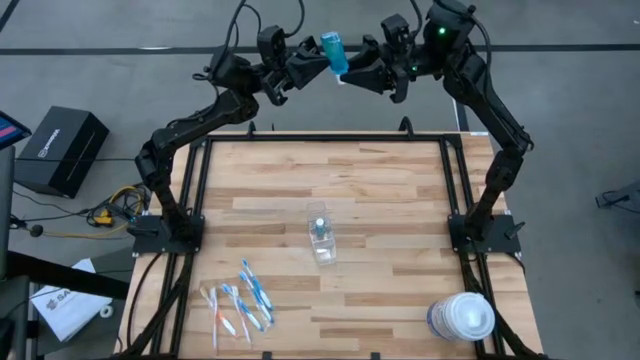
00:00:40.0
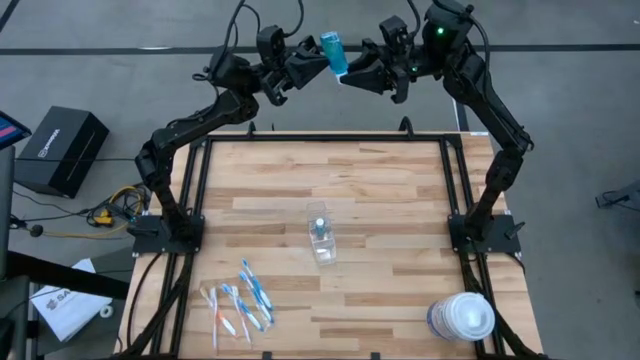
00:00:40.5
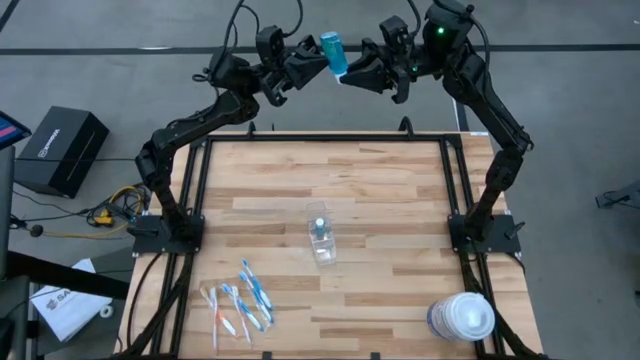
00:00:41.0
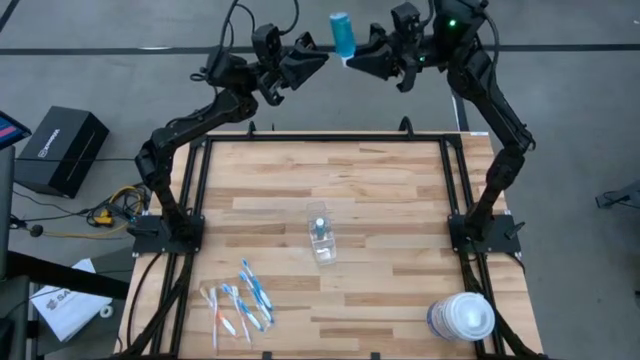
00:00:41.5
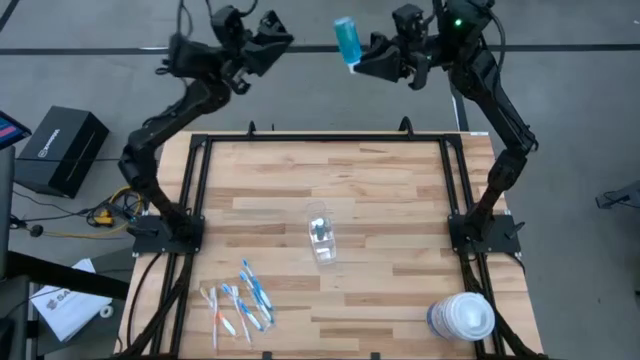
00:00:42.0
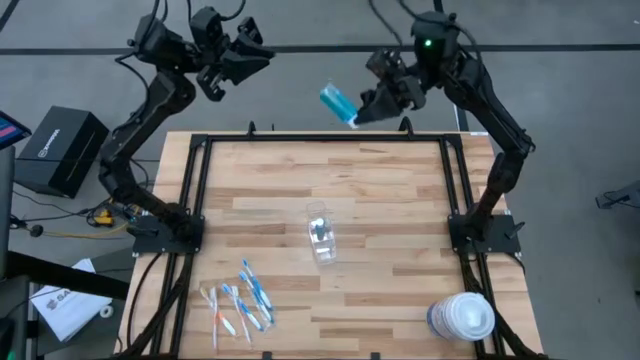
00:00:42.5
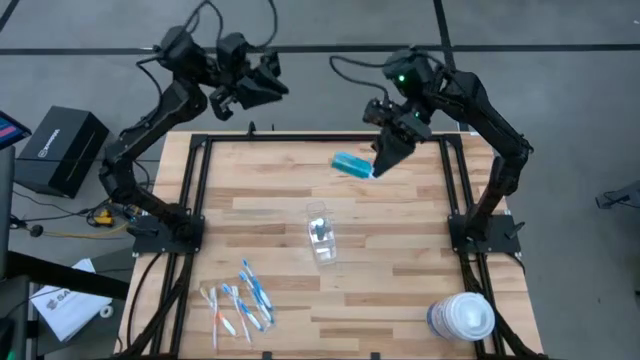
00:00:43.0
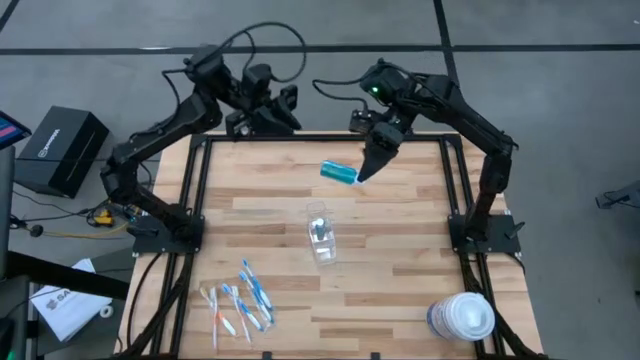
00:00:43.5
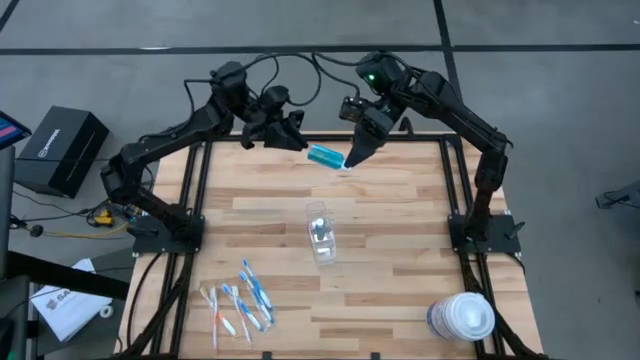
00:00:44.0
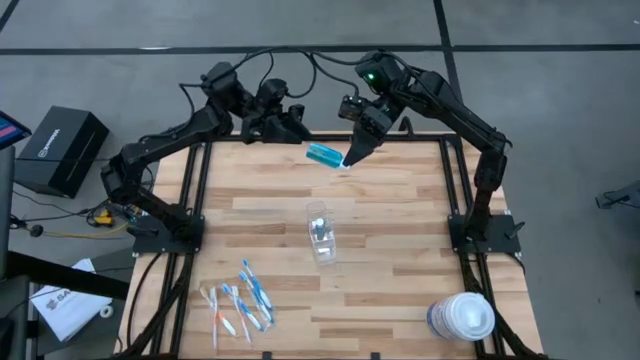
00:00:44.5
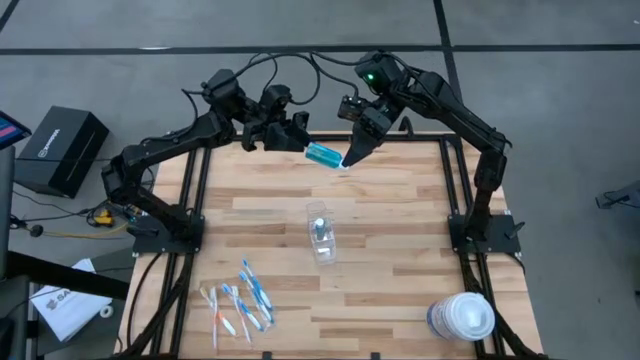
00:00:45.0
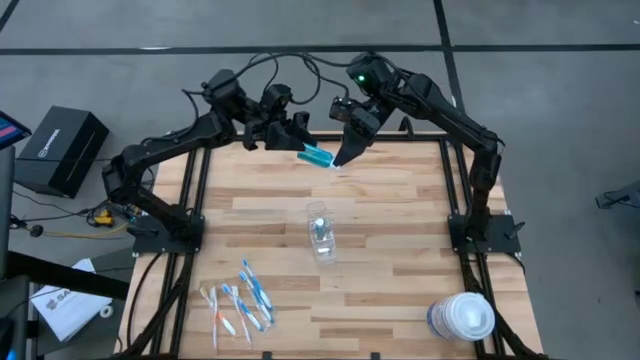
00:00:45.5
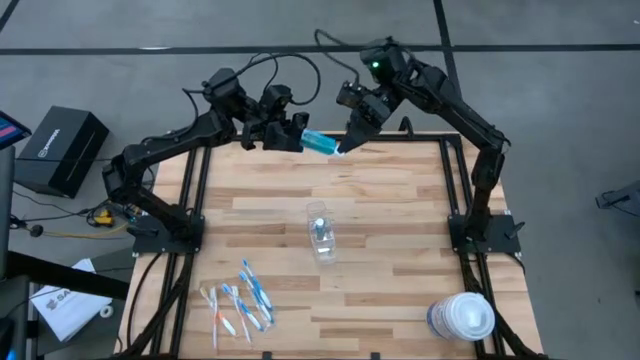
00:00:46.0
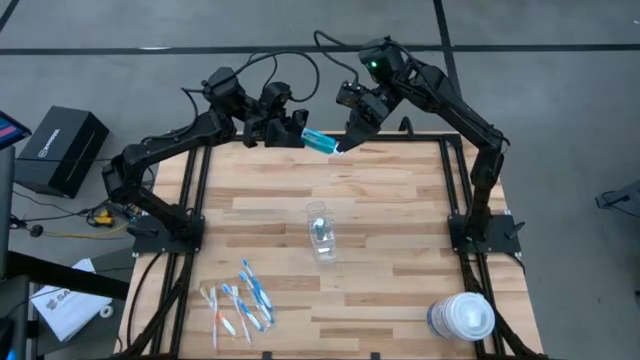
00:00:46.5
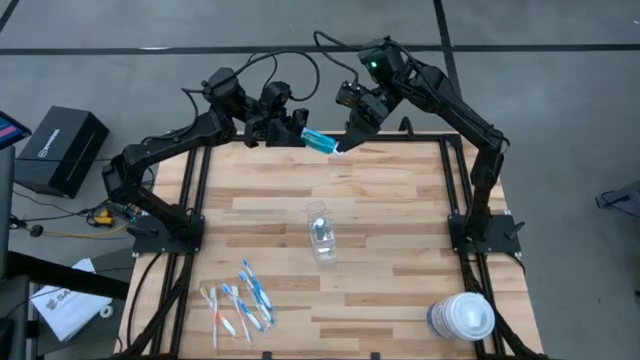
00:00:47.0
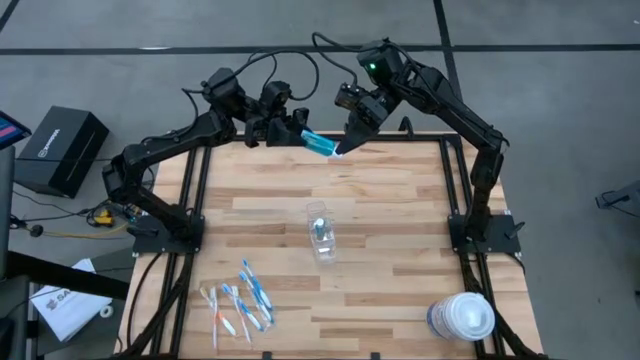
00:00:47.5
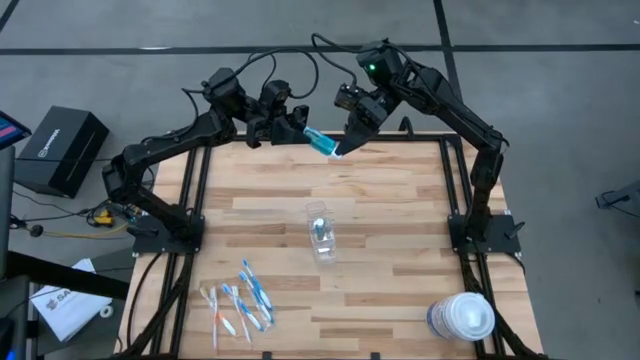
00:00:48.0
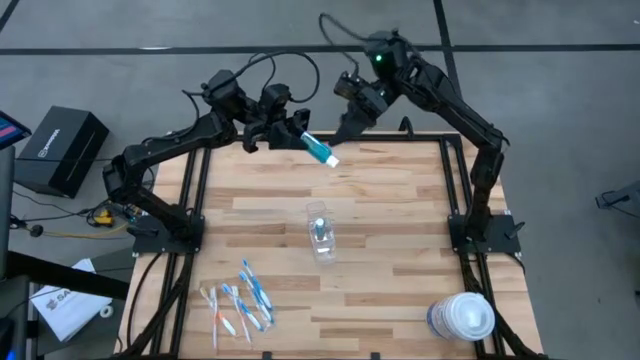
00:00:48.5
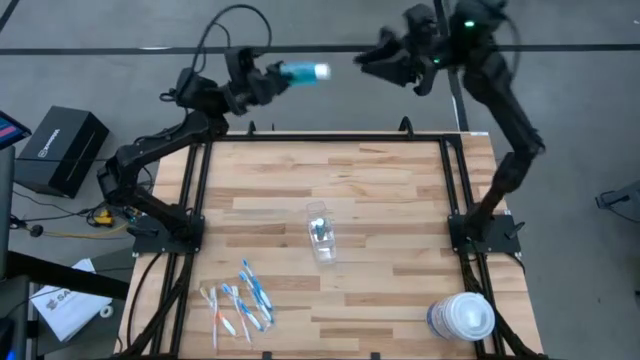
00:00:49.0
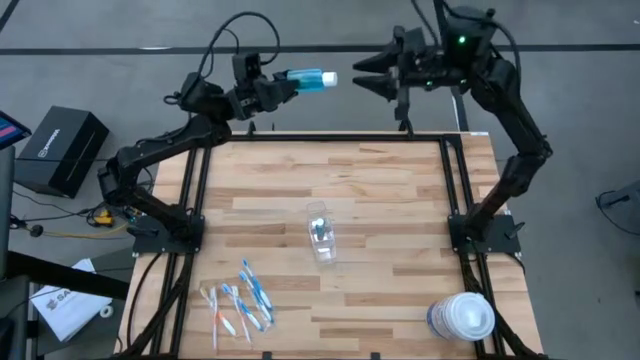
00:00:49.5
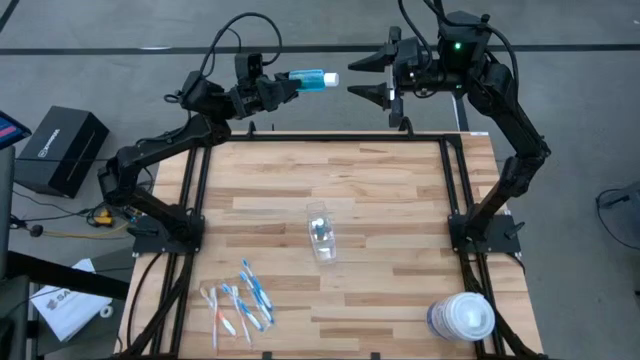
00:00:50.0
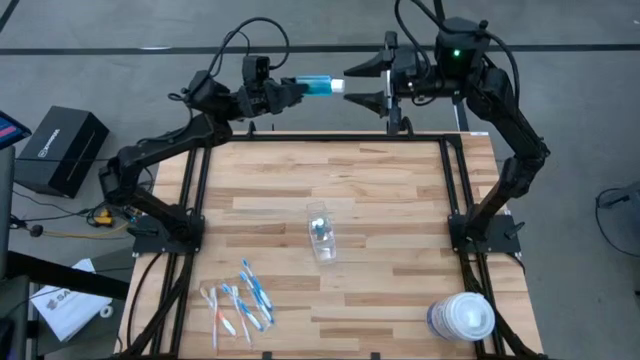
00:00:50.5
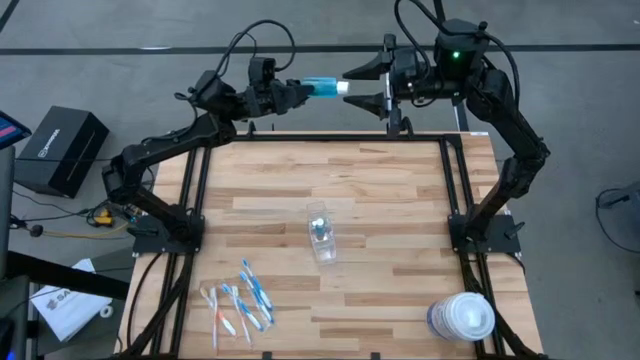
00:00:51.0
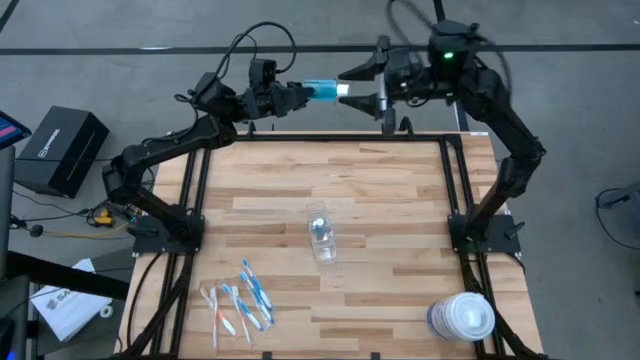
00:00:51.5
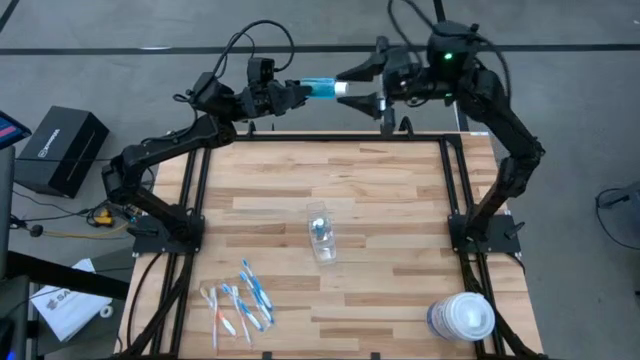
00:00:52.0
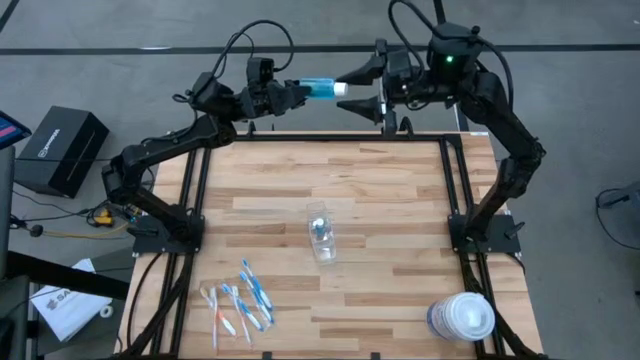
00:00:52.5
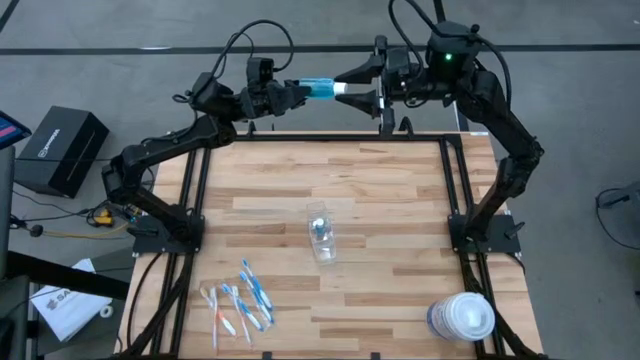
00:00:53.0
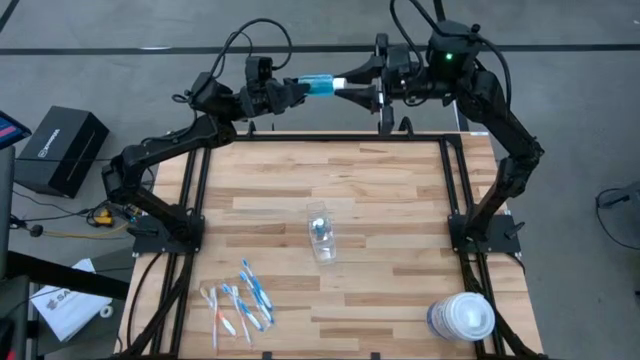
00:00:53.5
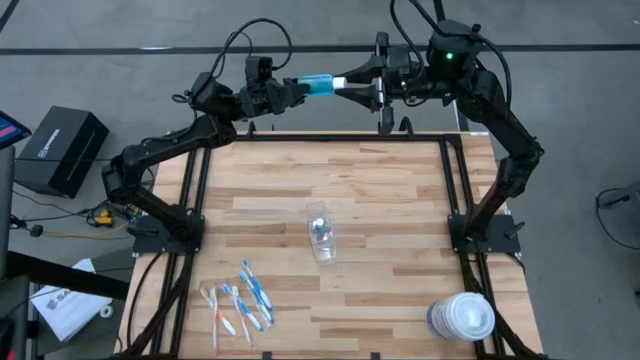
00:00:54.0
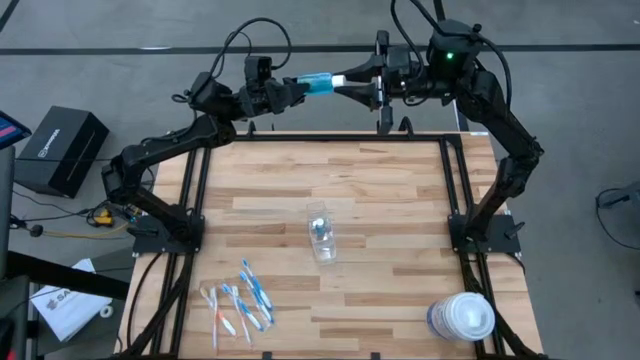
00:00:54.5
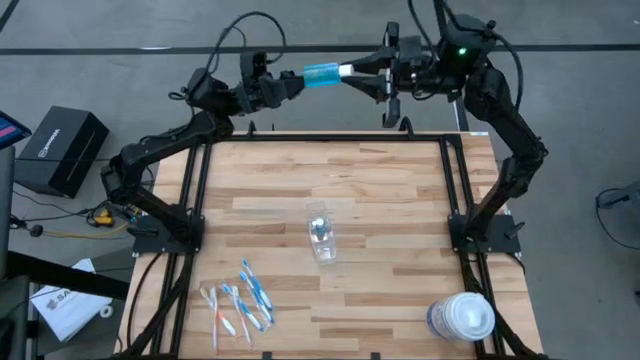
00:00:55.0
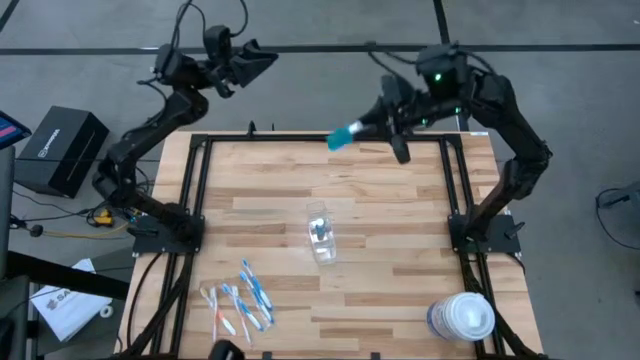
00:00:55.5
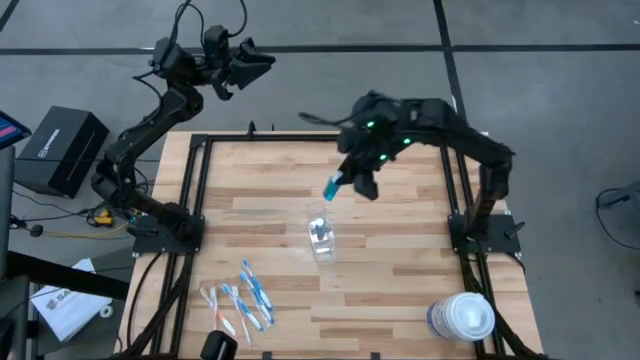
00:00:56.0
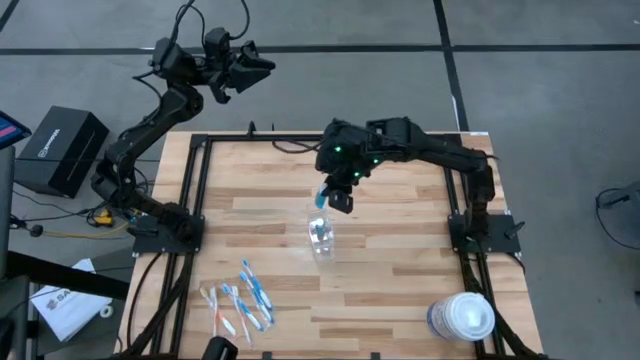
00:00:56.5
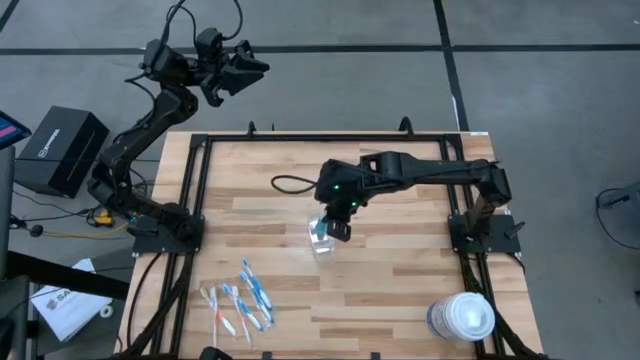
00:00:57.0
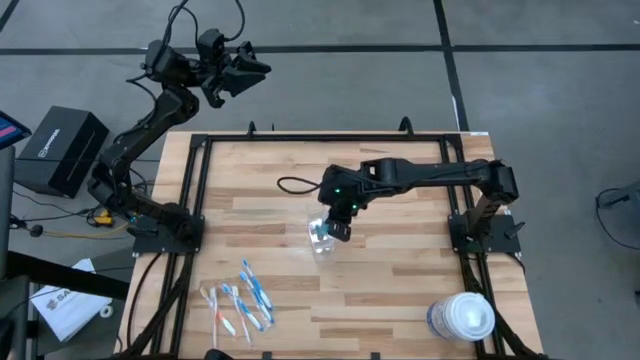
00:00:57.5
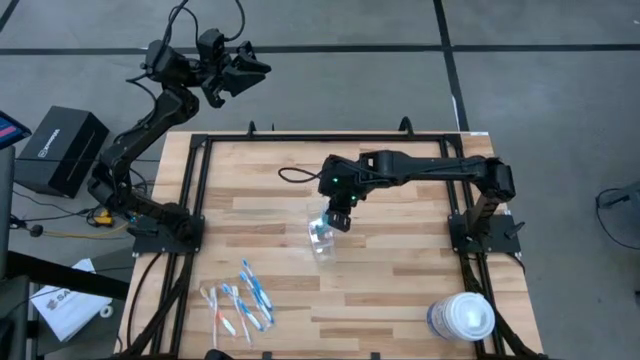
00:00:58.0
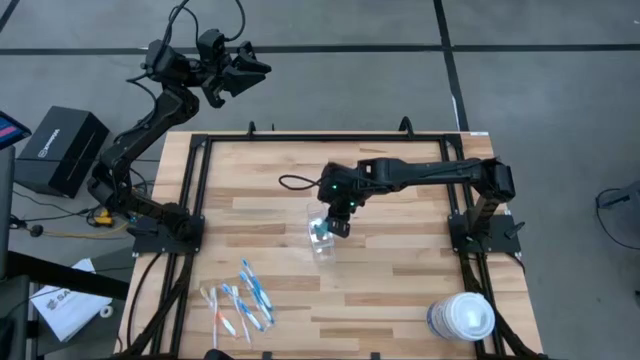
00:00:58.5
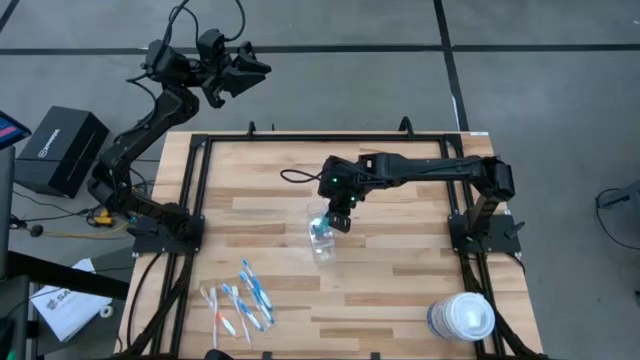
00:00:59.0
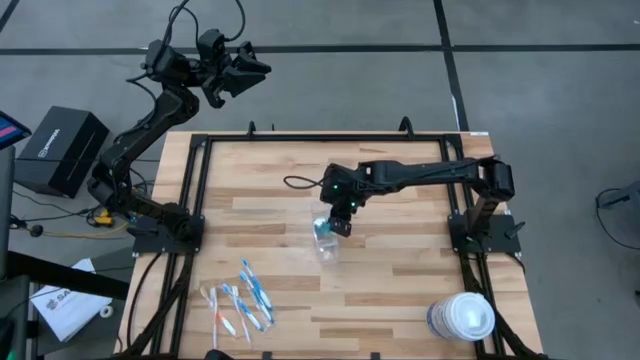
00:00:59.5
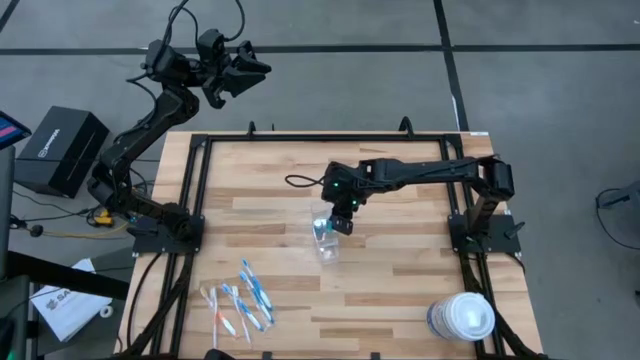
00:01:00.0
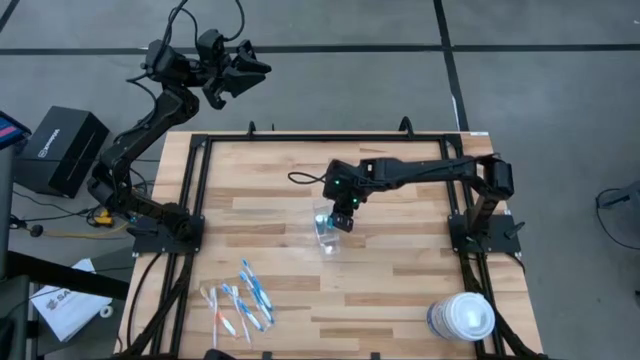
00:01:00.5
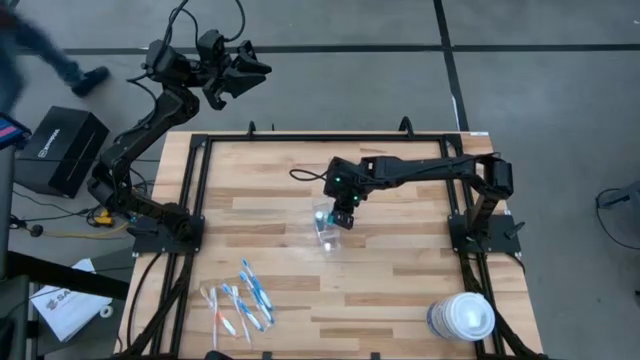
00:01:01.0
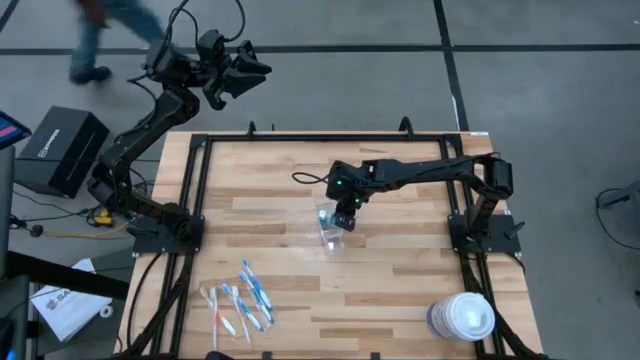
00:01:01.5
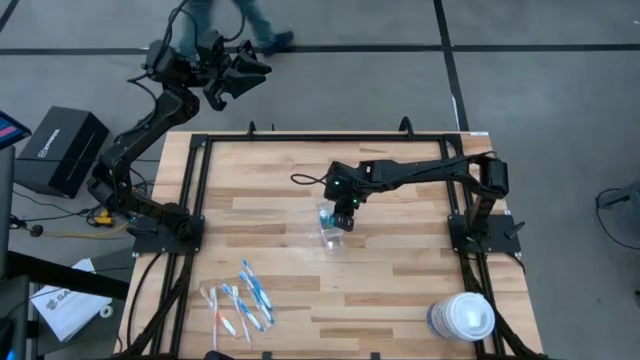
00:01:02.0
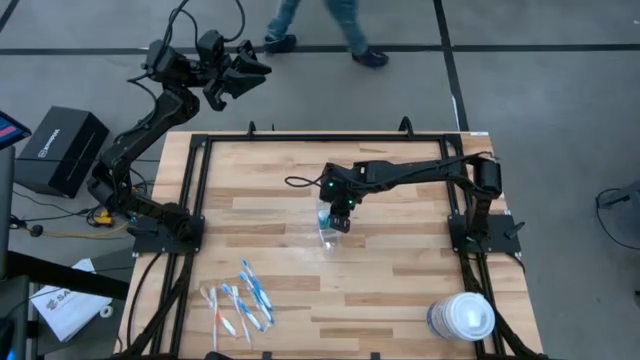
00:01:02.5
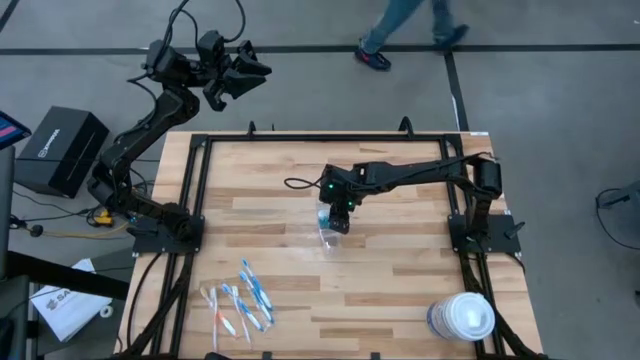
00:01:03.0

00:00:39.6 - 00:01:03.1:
Task: Pick & Place toothbrushing station
Put the blue mouthwash bottle into the transparent organizer
